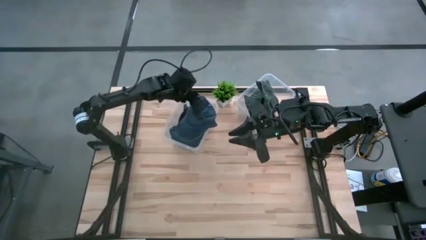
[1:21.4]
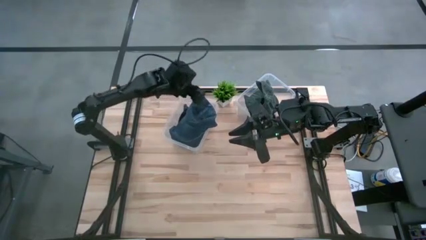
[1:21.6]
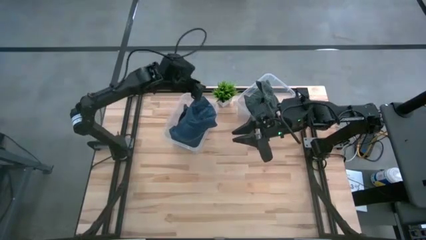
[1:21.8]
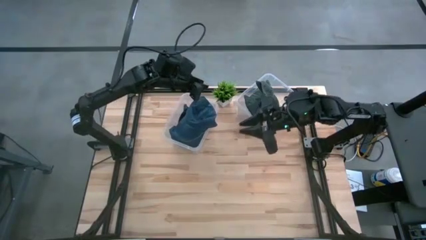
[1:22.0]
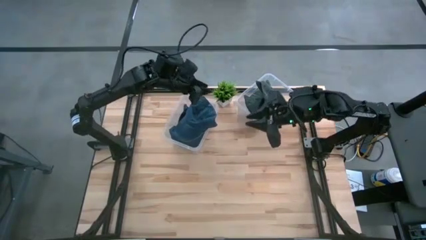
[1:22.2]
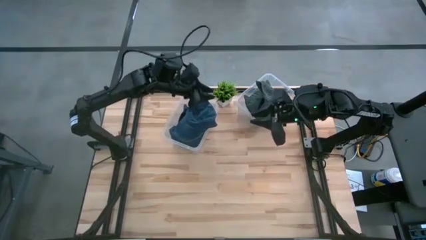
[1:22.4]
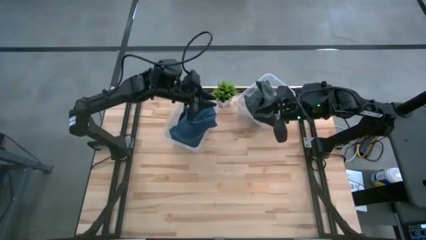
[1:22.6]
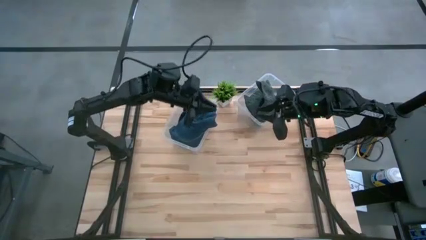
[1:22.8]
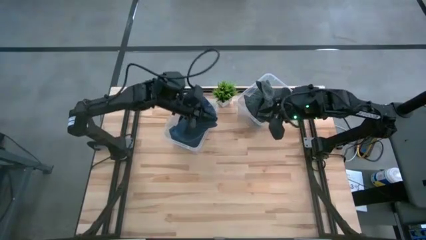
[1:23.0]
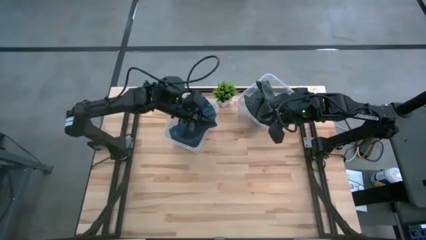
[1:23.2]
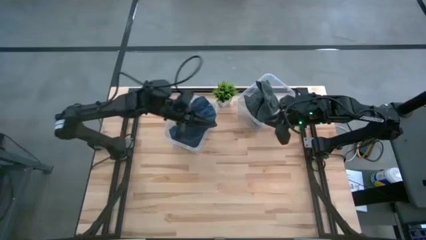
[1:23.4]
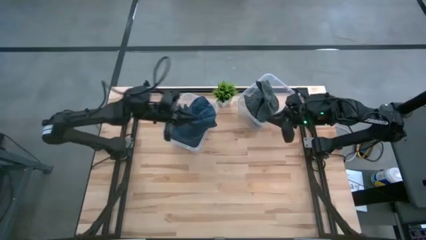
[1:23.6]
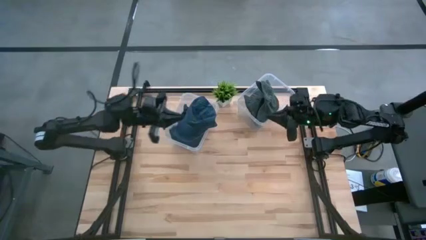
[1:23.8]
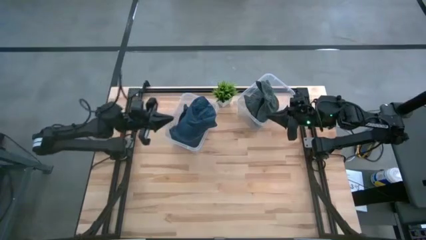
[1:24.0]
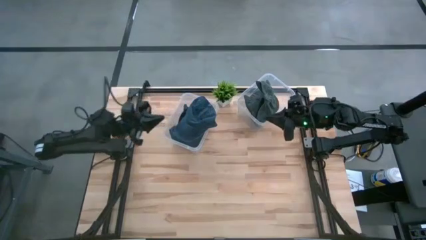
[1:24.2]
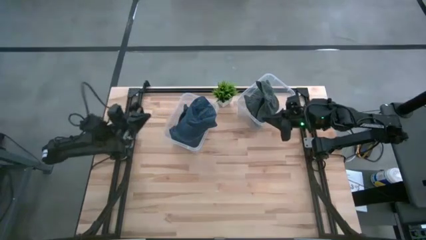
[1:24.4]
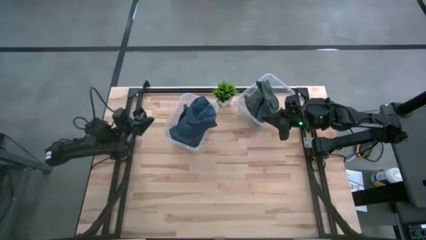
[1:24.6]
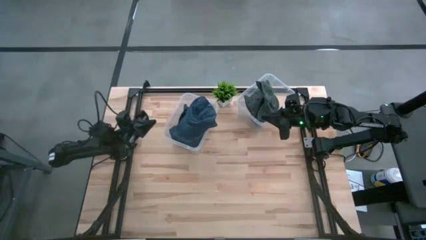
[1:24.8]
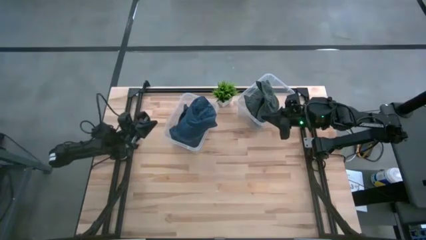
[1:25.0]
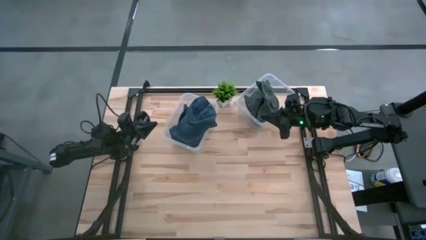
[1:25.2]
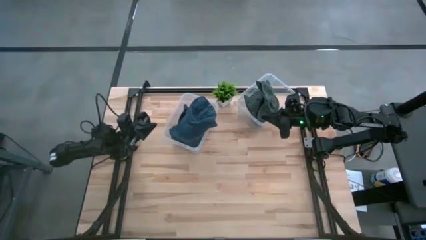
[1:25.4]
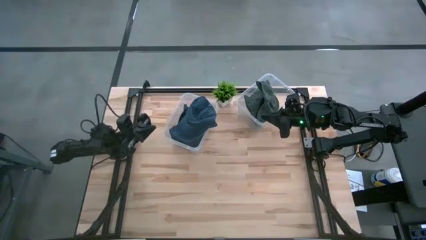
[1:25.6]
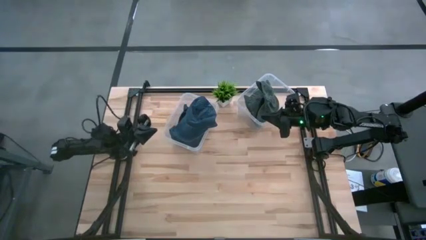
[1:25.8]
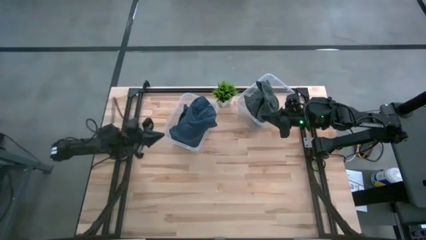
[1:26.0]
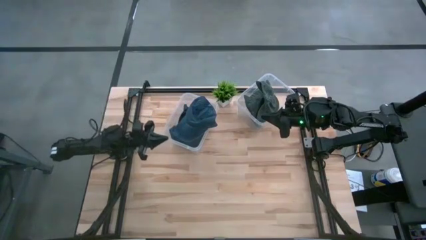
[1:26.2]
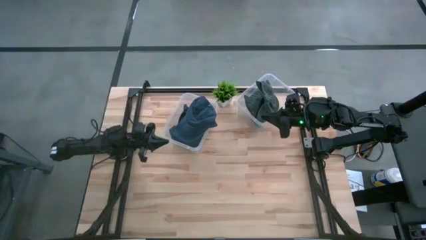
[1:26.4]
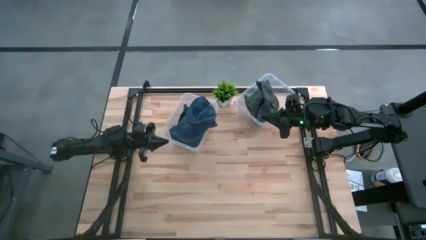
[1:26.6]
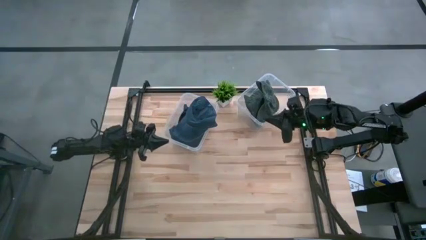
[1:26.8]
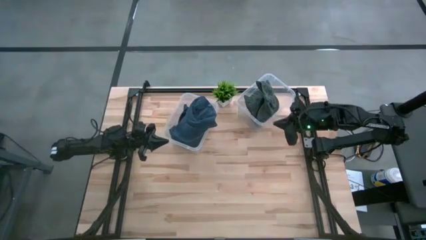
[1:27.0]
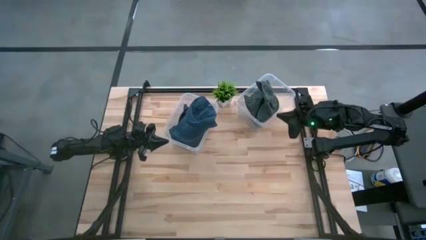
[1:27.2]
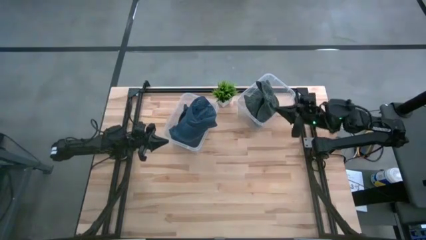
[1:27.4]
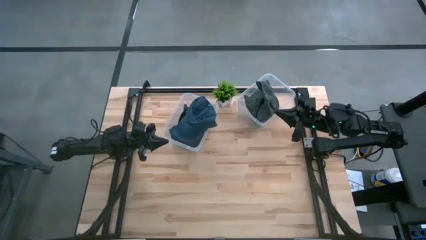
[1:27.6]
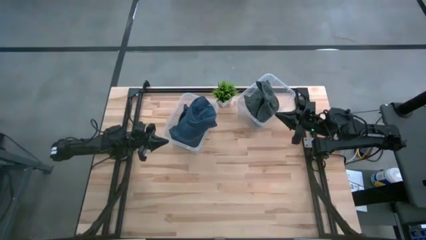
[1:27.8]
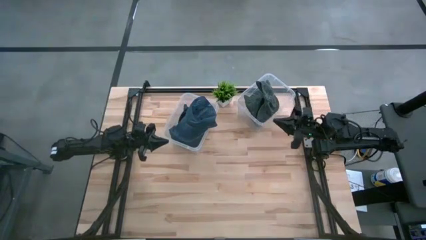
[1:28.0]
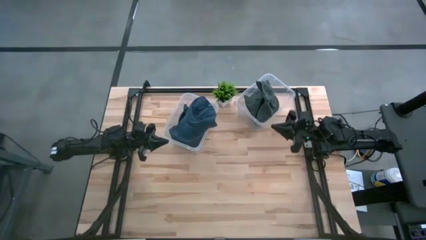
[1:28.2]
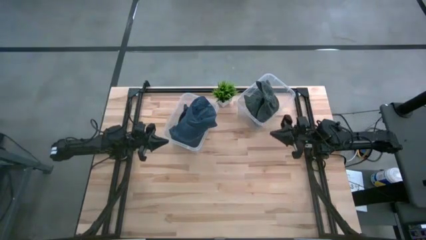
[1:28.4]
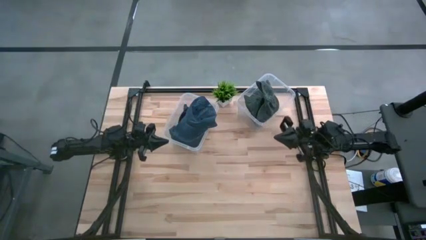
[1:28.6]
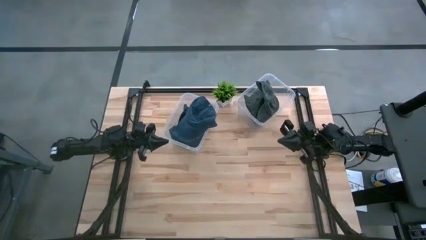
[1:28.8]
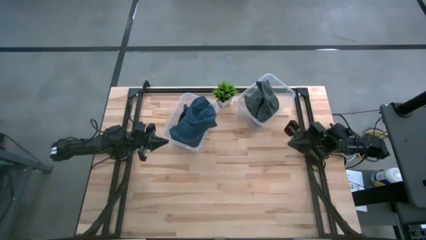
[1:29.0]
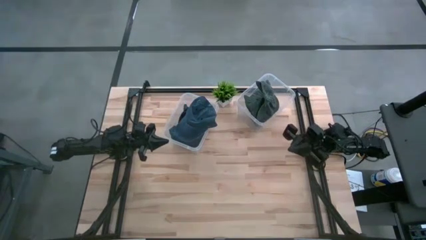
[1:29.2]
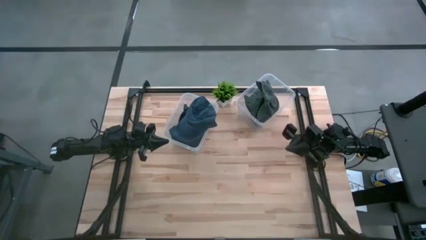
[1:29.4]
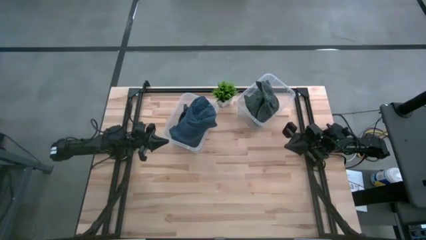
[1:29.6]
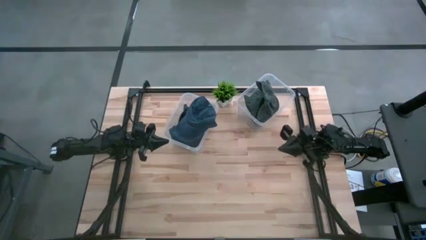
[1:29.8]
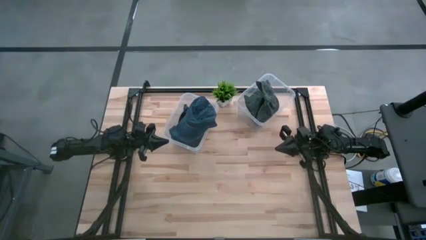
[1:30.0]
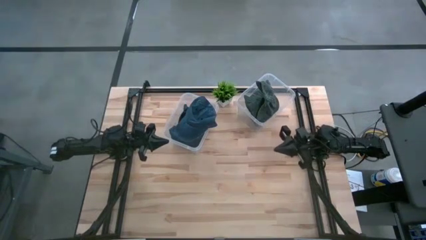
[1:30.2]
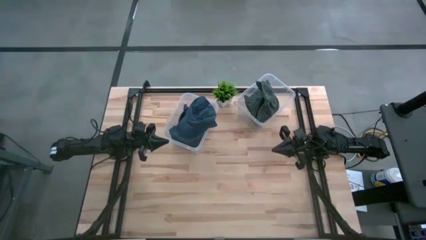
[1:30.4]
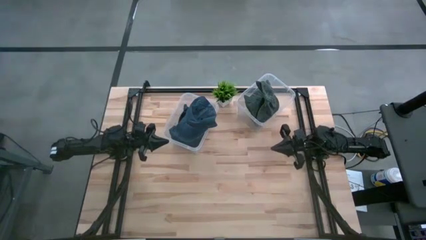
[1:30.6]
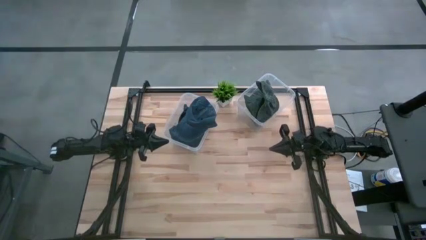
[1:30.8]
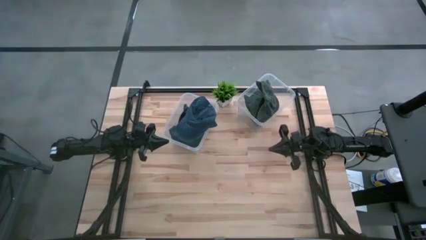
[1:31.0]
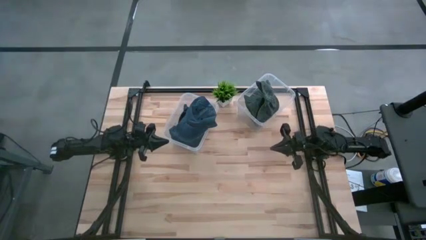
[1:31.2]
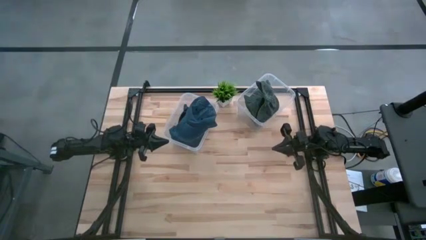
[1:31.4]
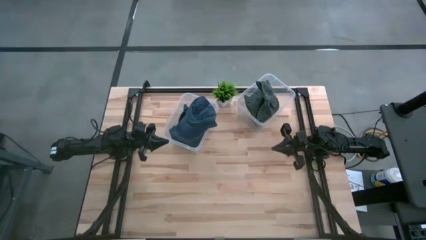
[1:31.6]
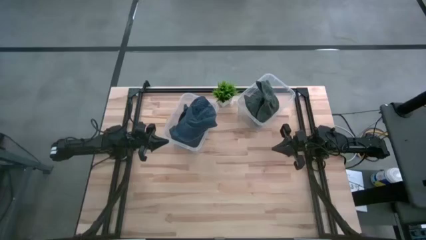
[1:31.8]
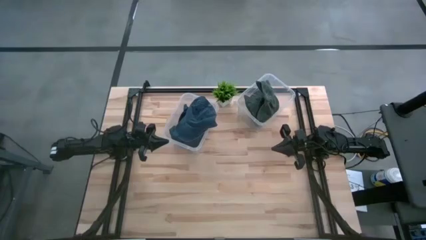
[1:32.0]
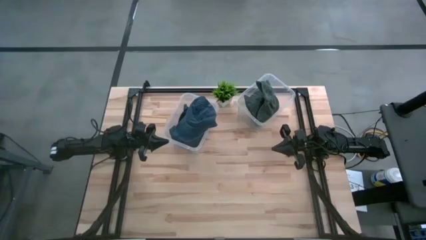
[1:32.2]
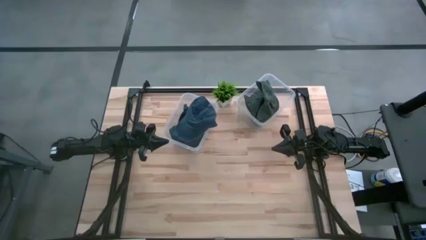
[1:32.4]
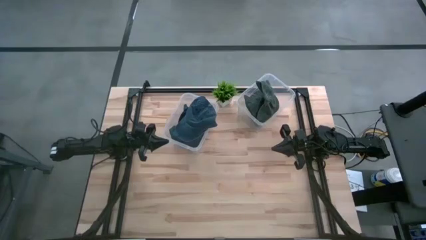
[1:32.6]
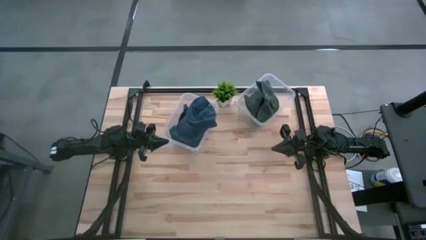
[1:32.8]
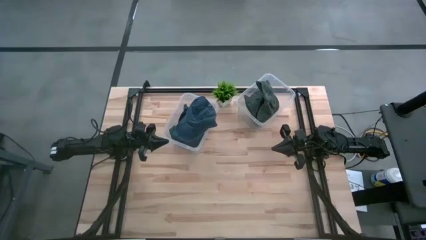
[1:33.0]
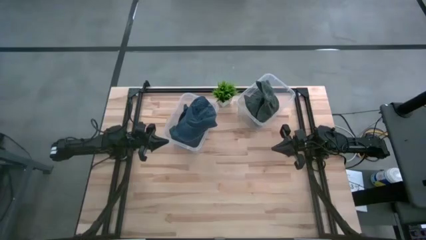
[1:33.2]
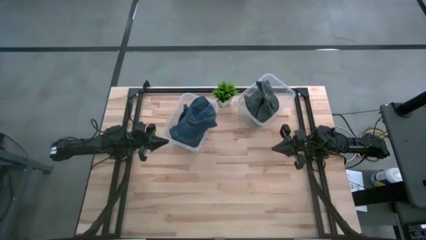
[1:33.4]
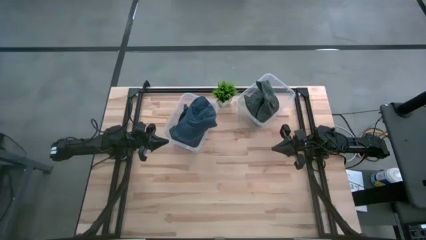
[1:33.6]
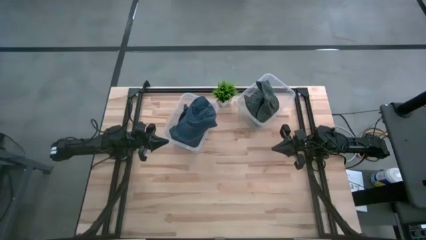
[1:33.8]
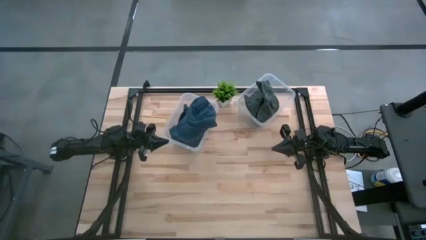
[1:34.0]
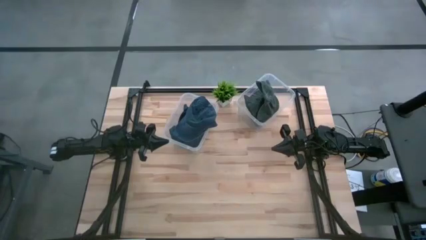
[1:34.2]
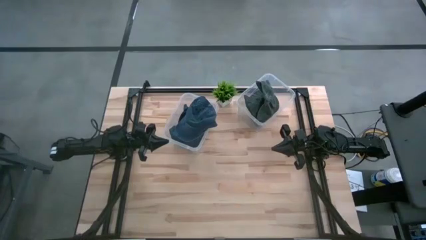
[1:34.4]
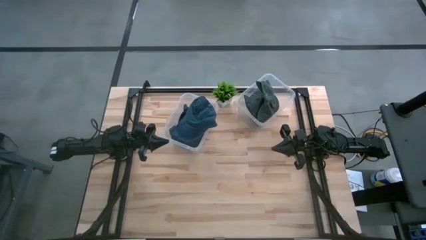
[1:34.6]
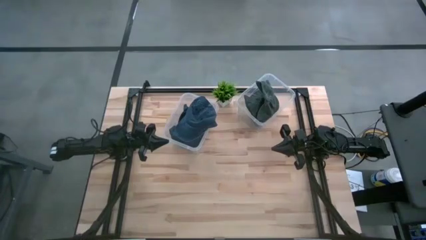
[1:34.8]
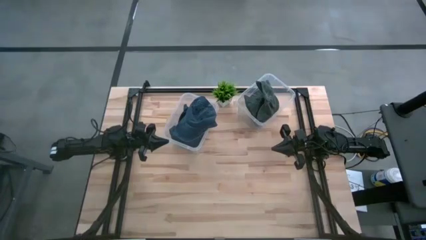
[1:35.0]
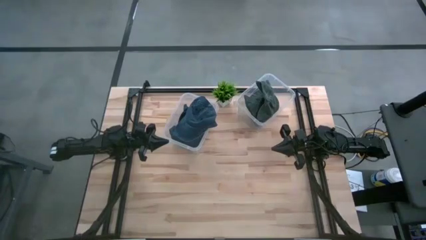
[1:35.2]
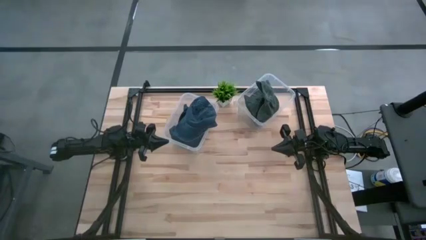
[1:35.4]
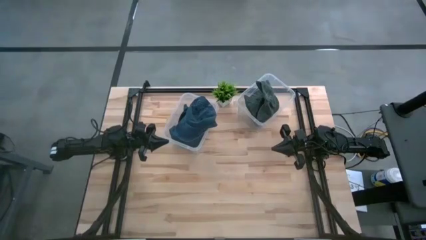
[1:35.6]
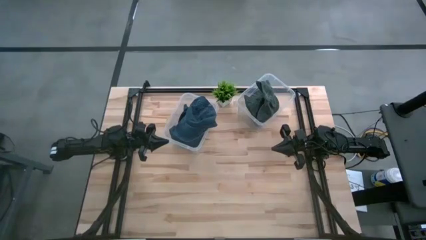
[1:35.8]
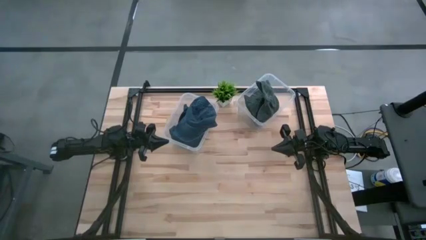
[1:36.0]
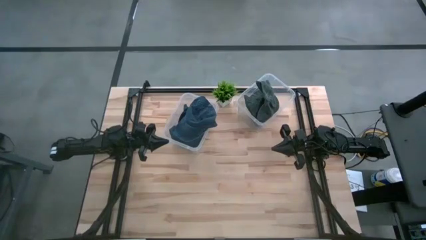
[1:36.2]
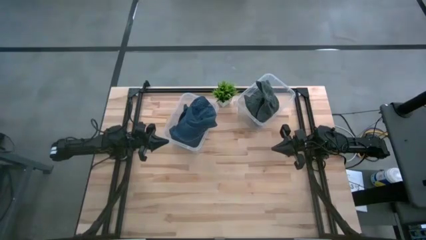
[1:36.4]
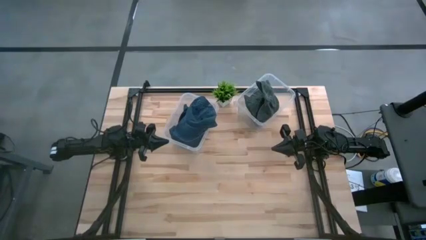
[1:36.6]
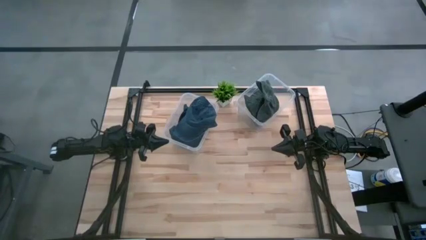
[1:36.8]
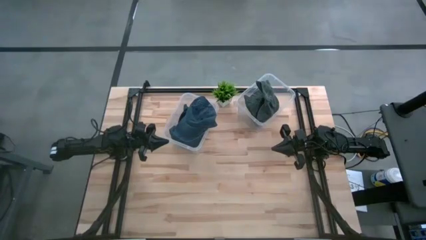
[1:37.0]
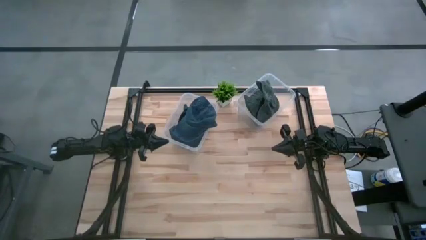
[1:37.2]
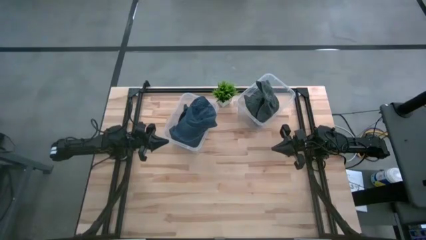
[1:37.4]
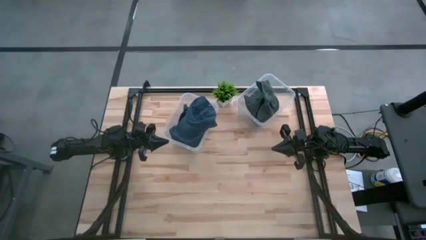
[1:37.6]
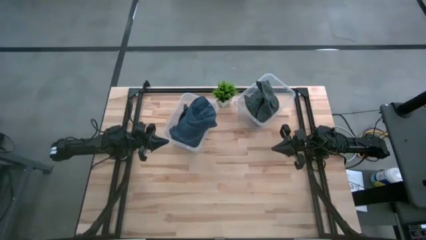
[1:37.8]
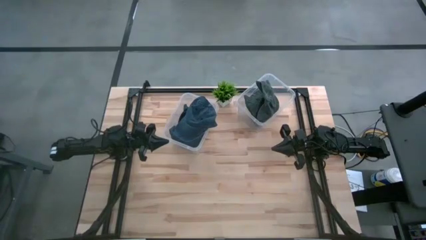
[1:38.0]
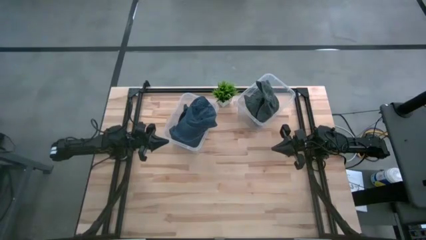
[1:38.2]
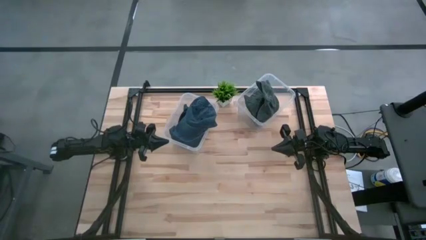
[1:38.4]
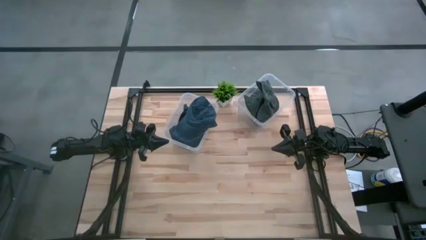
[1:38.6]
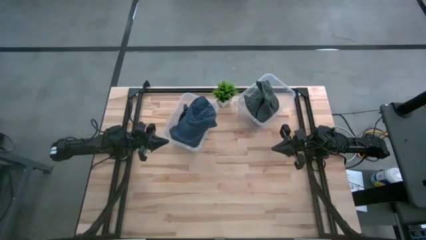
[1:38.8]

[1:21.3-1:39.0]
Task: Pick & Place hat
Return to Home Position
